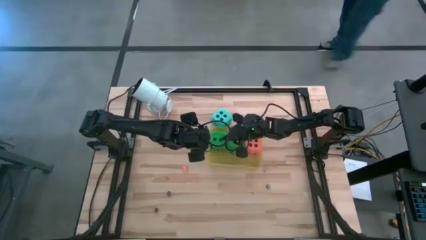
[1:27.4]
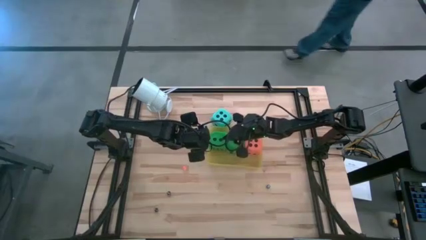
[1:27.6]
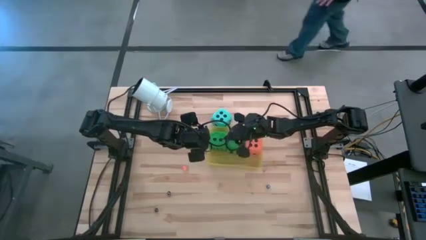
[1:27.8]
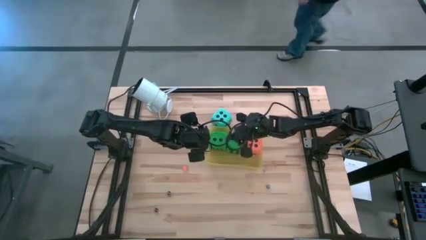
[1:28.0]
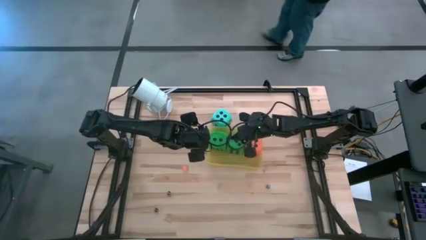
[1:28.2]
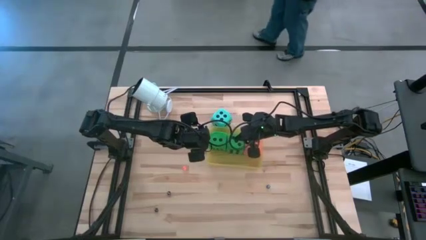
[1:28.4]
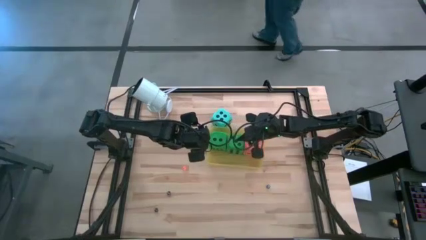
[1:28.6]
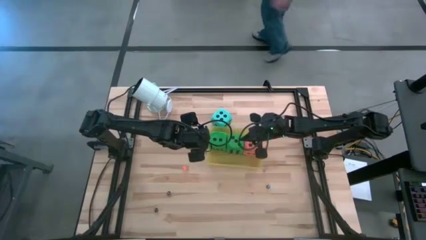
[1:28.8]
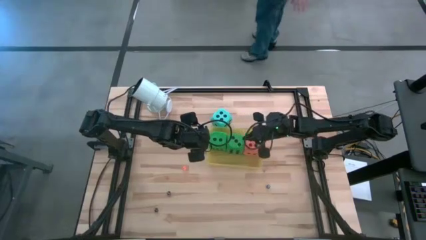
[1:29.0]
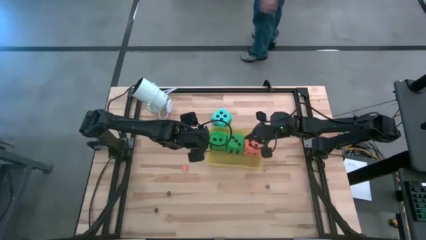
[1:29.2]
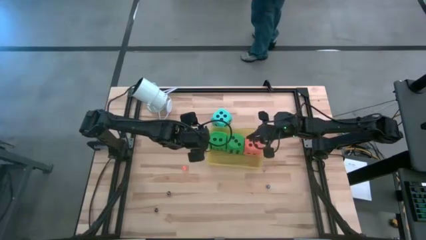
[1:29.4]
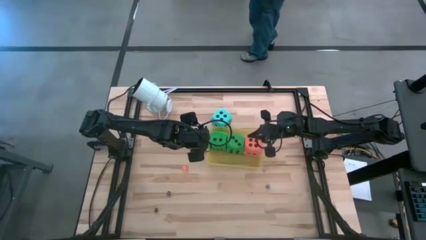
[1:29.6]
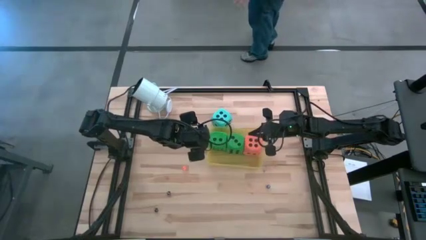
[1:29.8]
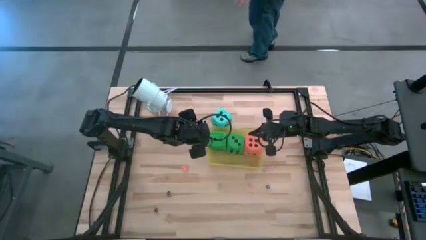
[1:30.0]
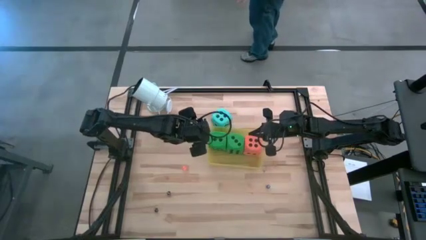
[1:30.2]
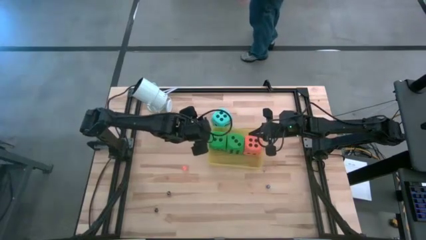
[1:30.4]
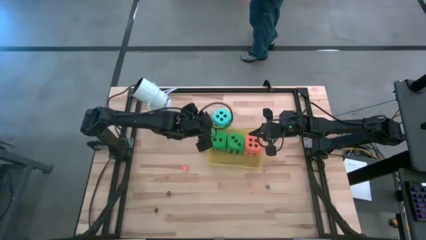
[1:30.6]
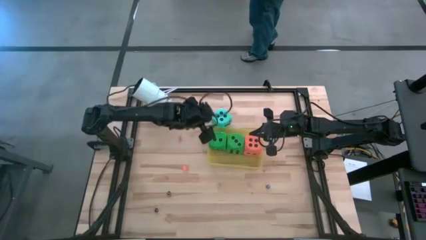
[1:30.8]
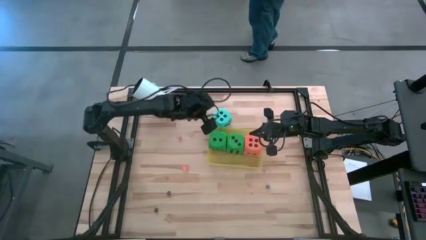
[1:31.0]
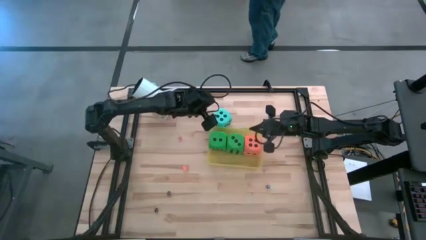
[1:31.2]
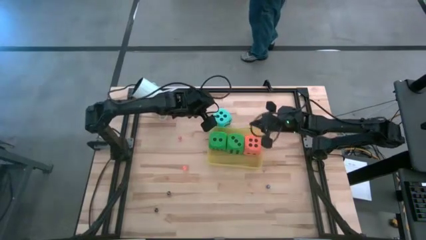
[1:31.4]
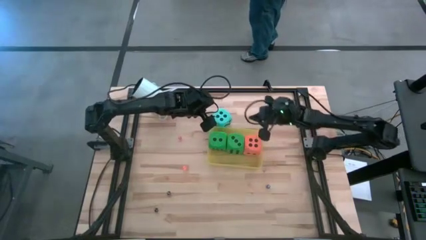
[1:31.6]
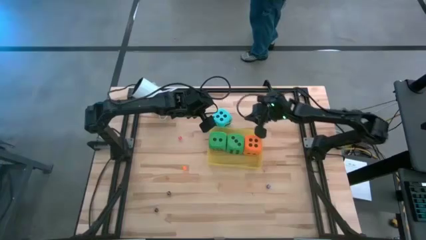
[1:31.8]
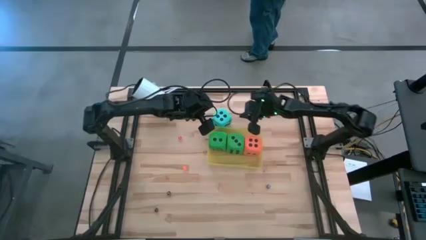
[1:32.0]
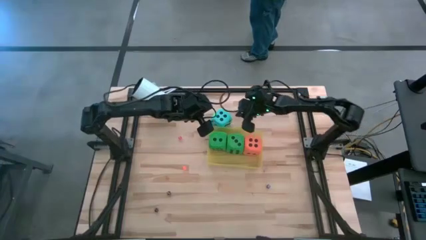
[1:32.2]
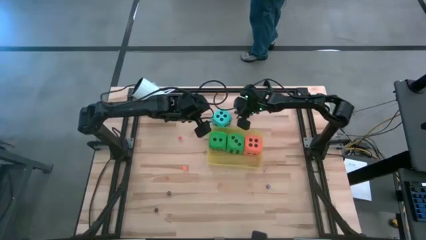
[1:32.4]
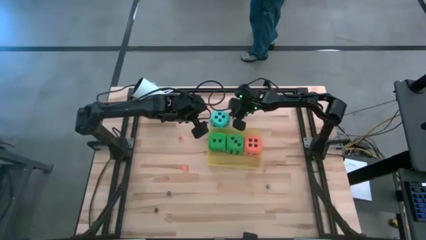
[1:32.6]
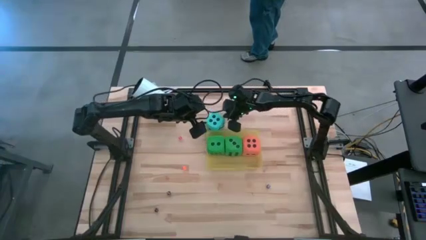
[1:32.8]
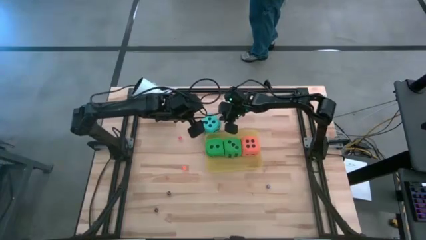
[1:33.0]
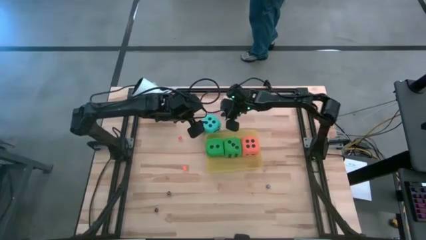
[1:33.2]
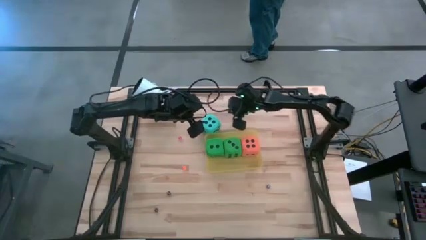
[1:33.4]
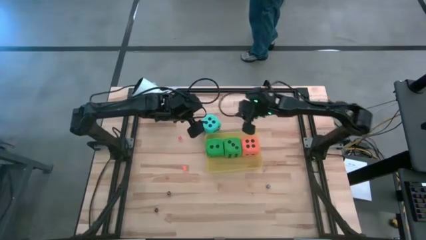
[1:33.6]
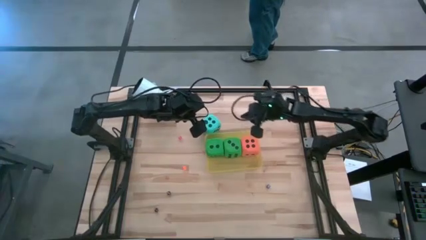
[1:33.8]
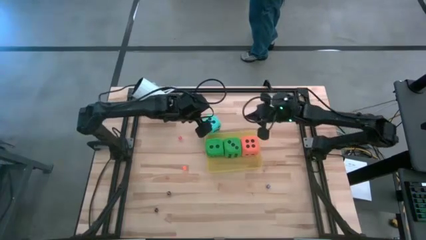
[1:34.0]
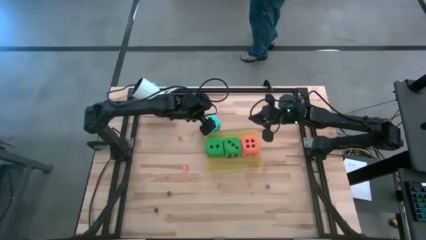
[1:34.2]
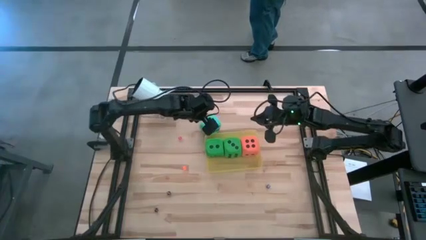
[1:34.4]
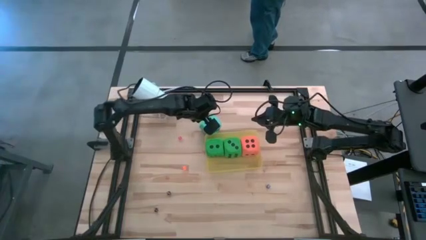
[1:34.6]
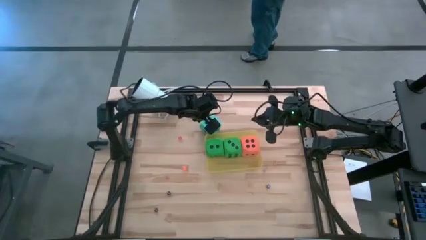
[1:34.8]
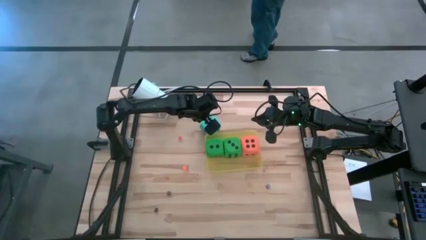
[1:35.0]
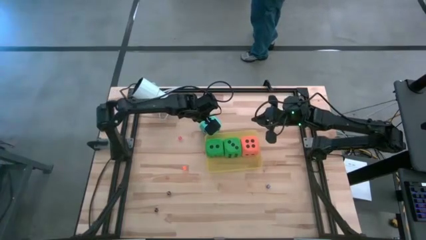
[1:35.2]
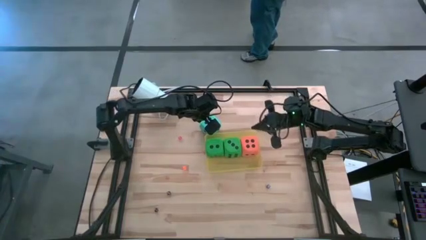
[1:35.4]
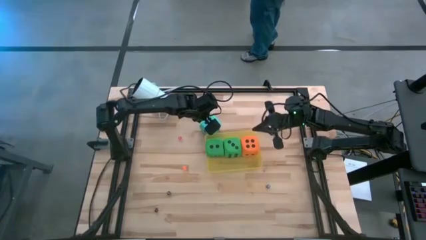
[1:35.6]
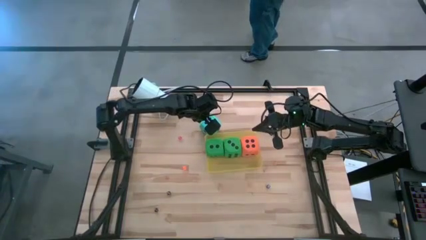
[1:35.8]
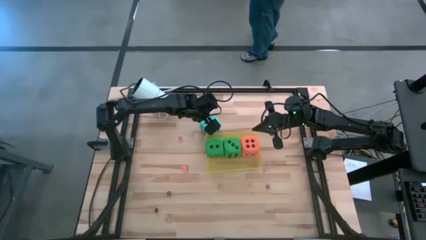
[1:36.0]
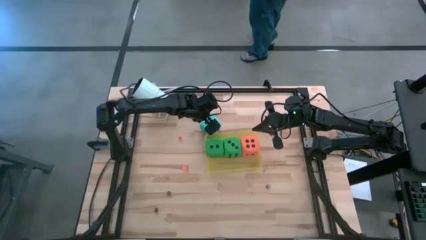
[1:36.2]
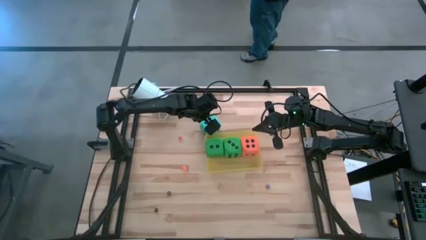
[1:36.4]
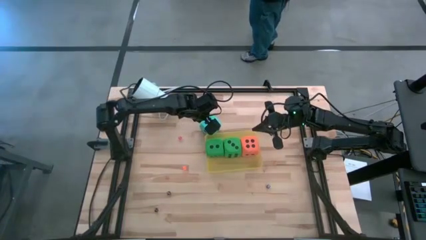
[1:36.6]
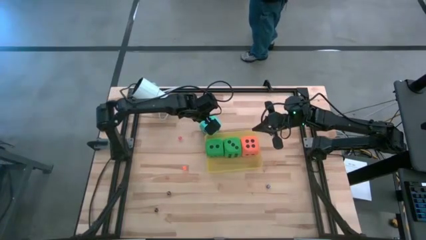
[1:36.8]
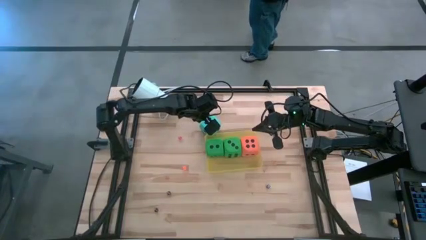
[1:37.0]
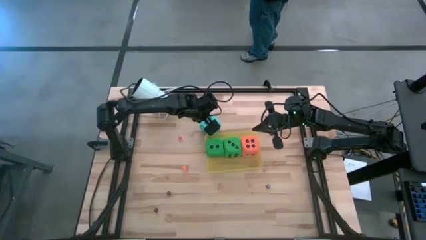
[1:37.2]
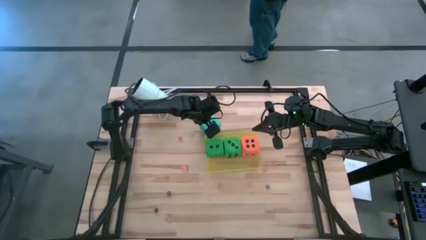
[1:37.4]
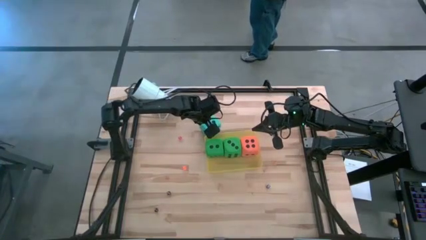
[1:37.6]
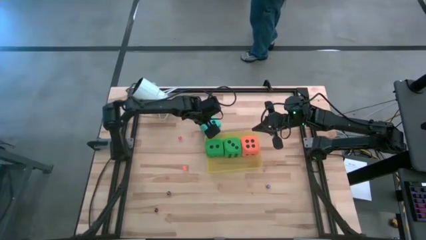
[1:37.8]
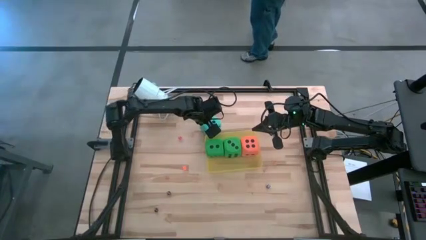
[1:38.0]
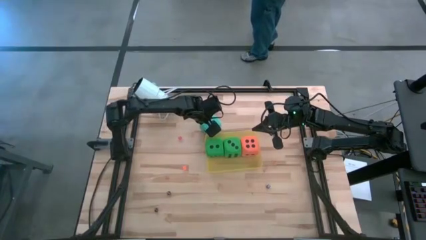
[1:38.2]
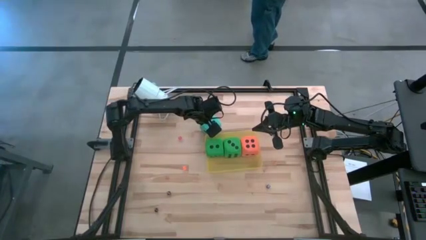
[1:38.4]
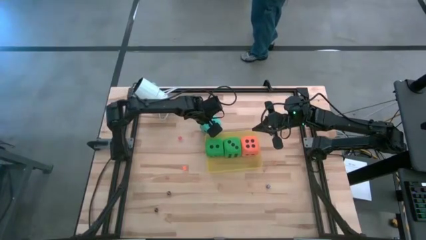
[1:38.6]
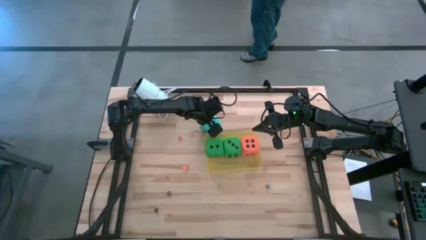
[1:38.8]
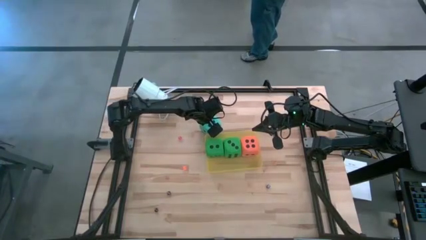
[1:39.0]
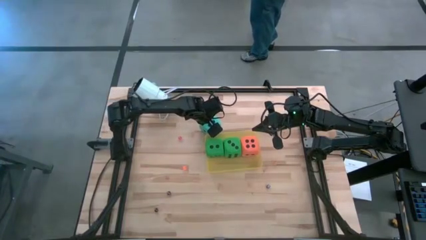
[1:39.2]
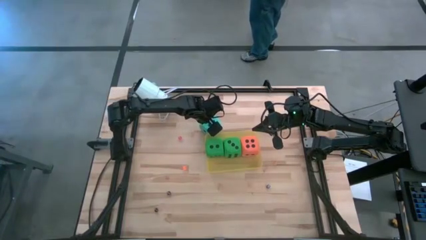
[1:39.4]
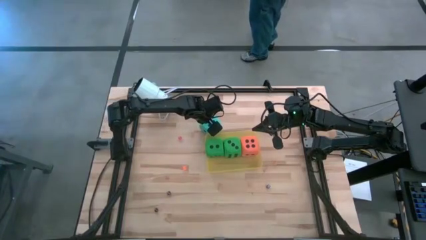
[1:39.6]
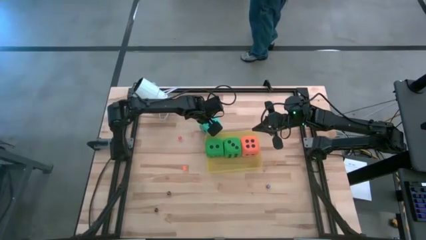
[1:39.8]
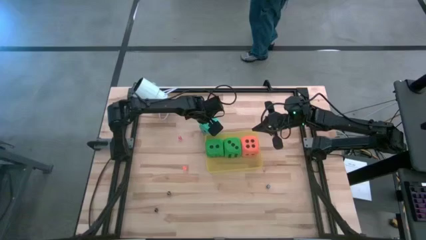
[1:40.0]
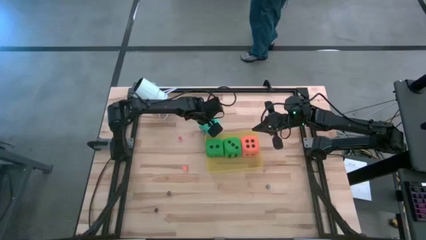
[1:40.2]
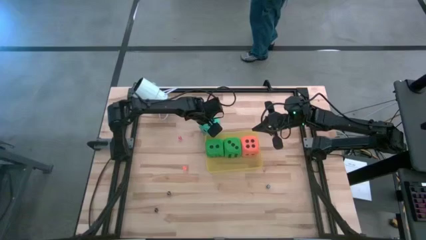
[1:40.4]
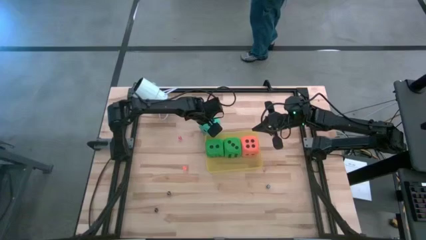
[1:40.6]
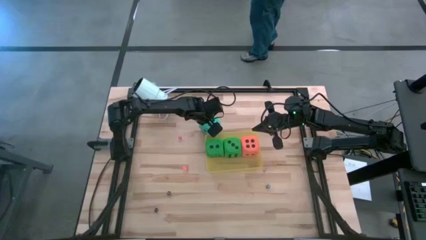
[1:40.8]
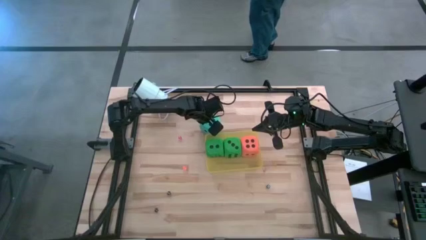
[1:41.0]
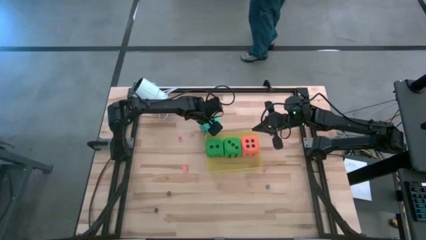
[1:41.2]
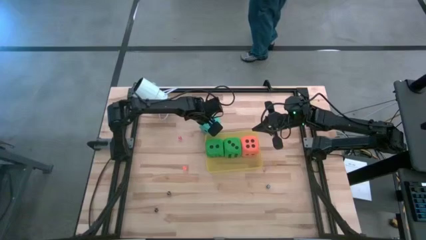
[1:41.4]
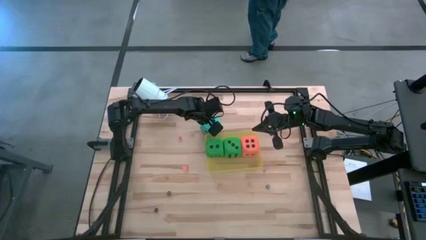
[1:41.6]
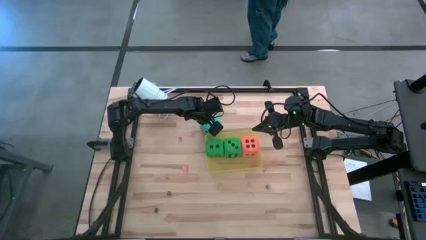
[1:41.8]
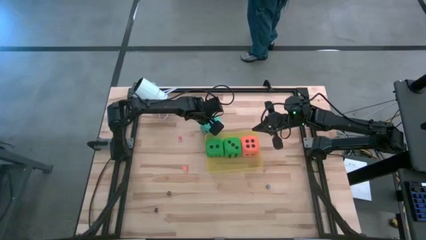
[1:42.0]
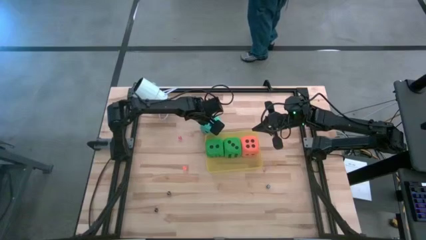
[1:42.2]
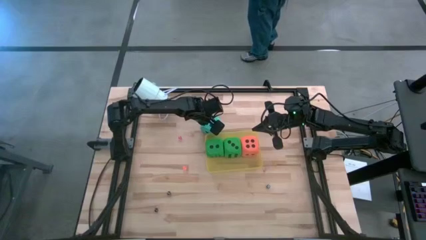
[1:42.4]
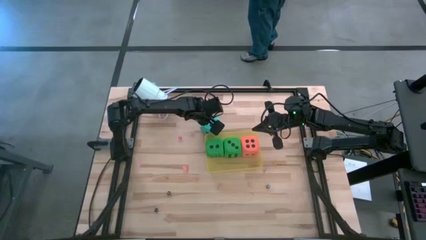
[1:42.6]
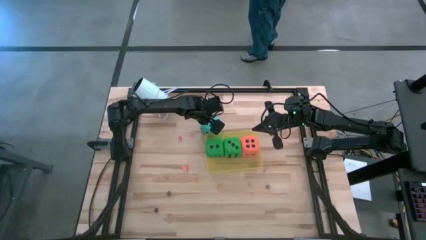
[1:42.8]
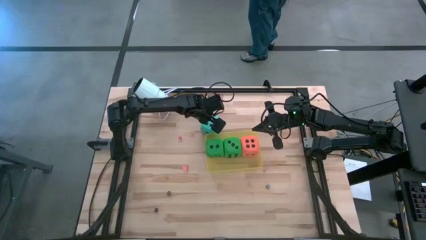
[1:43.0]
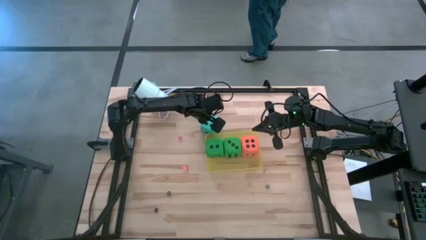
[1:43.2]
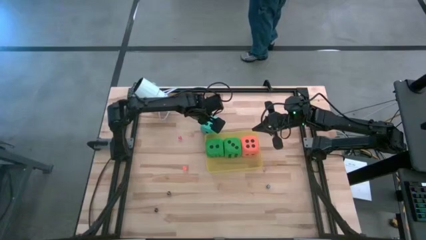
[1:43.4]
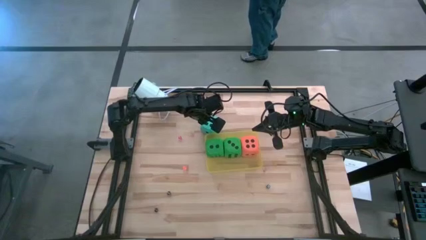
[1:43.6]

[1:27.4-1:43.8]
Task: Pick & Place Dice
Put the big light blue dice into the yellow bin
